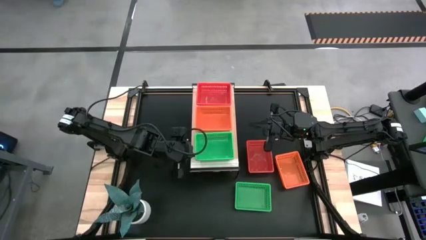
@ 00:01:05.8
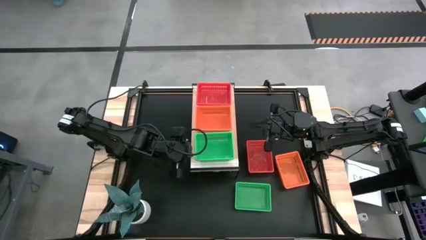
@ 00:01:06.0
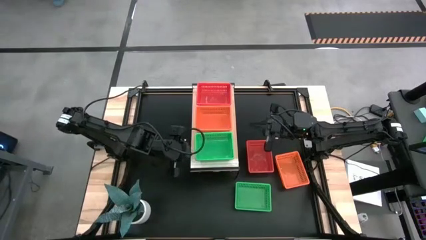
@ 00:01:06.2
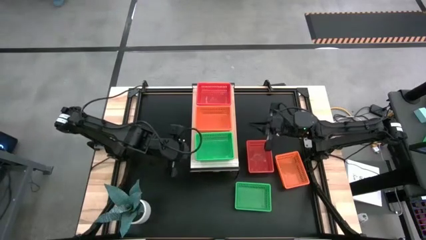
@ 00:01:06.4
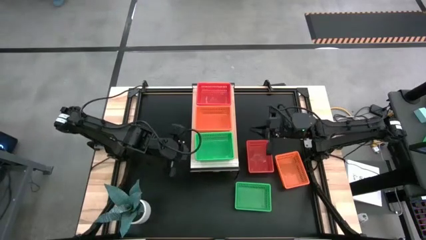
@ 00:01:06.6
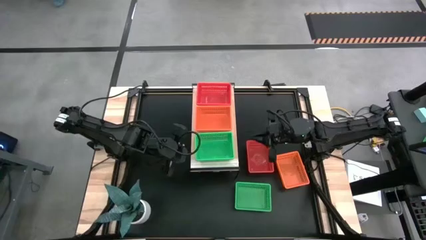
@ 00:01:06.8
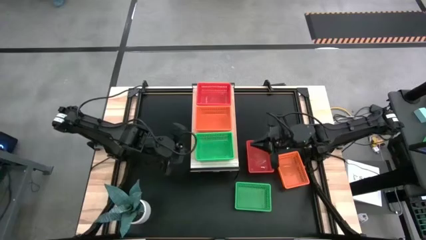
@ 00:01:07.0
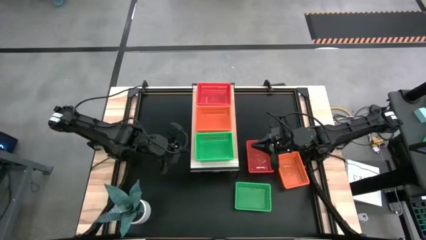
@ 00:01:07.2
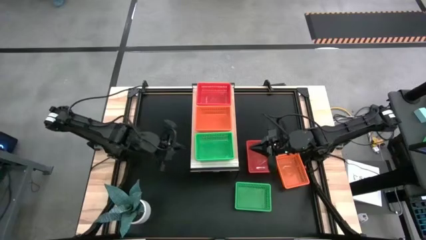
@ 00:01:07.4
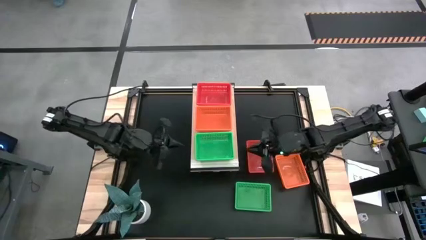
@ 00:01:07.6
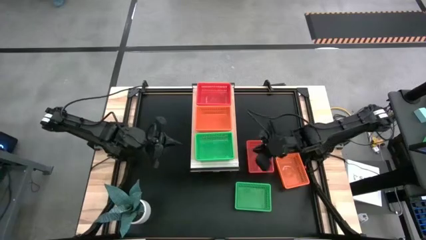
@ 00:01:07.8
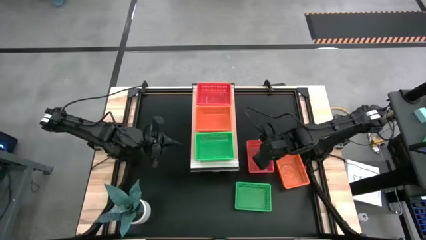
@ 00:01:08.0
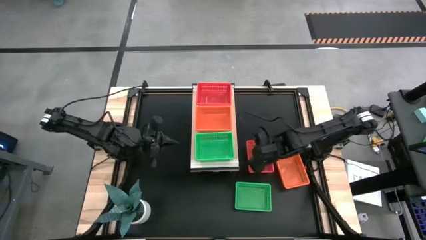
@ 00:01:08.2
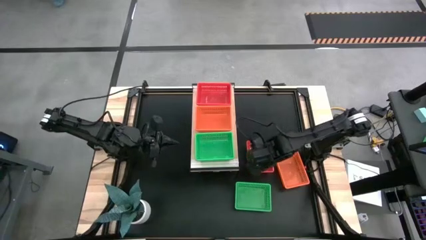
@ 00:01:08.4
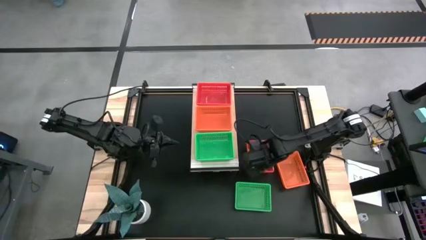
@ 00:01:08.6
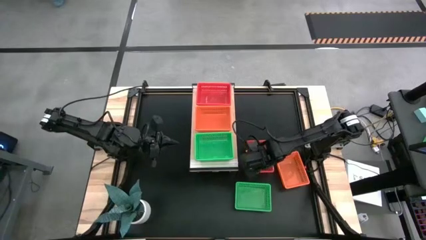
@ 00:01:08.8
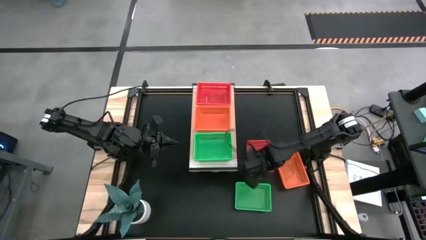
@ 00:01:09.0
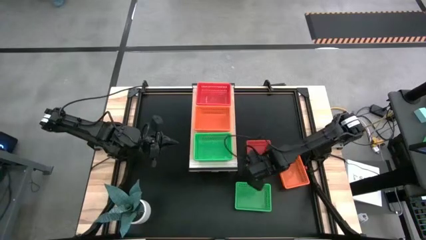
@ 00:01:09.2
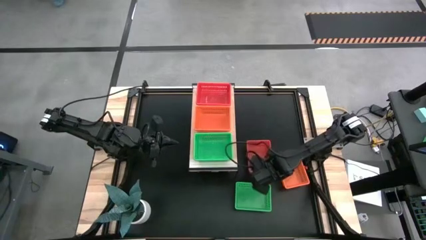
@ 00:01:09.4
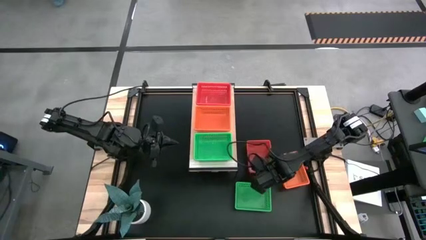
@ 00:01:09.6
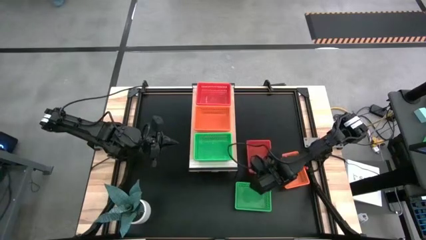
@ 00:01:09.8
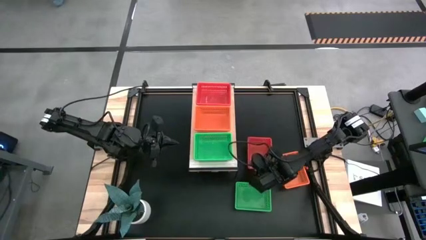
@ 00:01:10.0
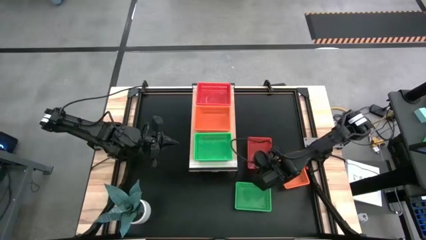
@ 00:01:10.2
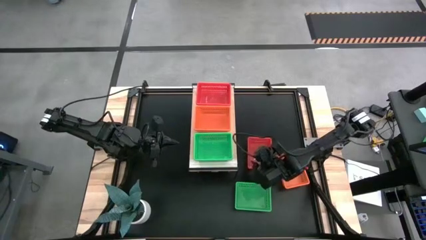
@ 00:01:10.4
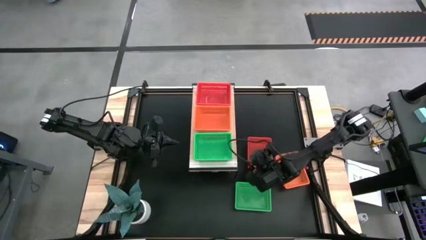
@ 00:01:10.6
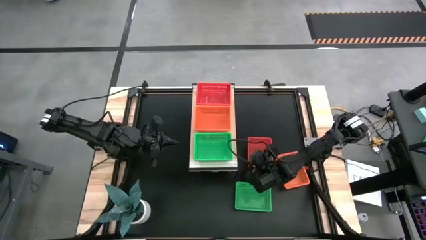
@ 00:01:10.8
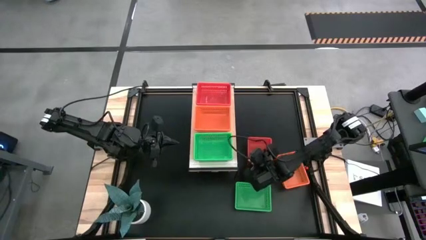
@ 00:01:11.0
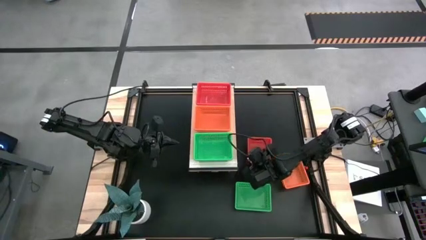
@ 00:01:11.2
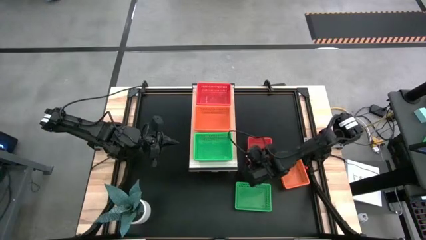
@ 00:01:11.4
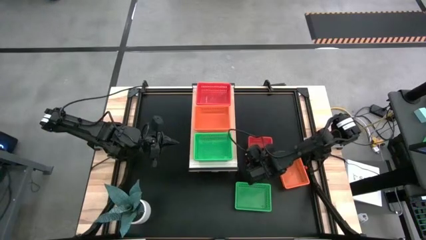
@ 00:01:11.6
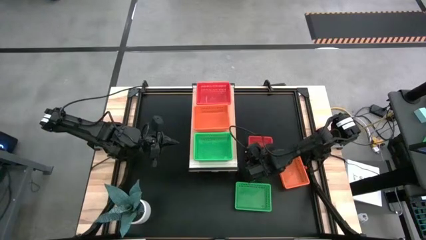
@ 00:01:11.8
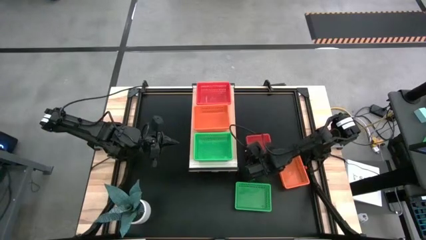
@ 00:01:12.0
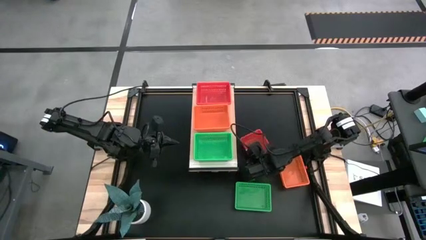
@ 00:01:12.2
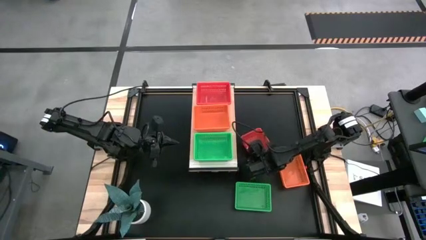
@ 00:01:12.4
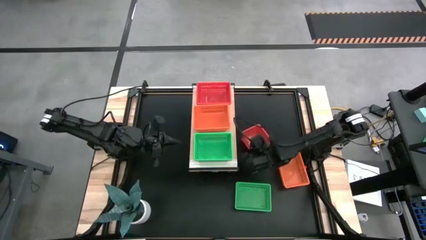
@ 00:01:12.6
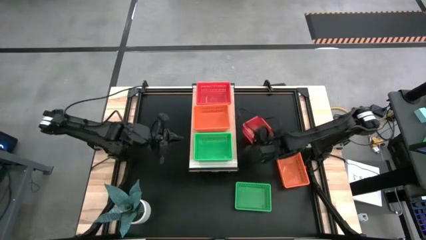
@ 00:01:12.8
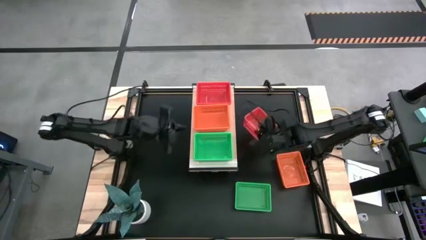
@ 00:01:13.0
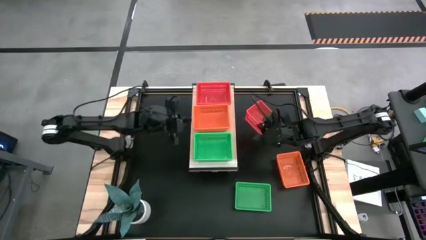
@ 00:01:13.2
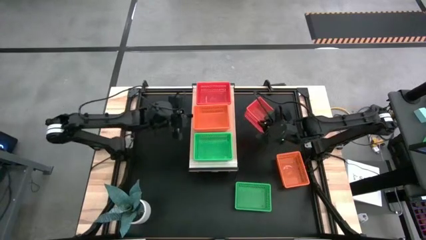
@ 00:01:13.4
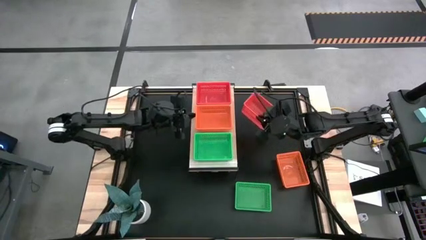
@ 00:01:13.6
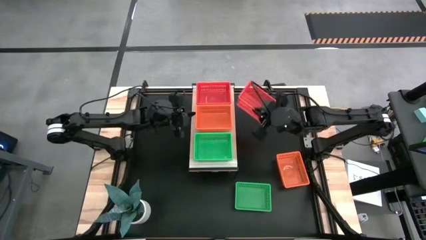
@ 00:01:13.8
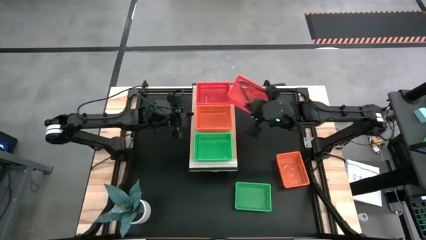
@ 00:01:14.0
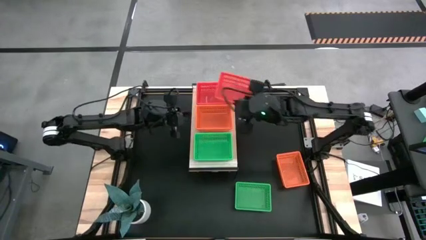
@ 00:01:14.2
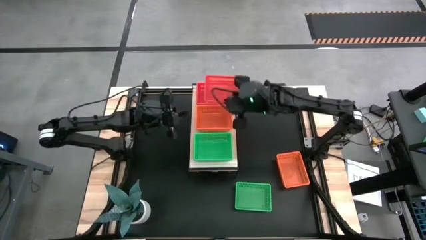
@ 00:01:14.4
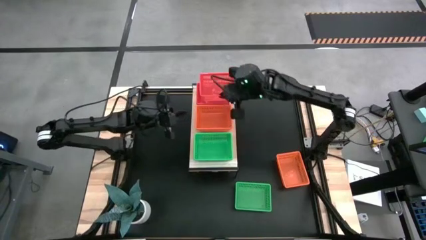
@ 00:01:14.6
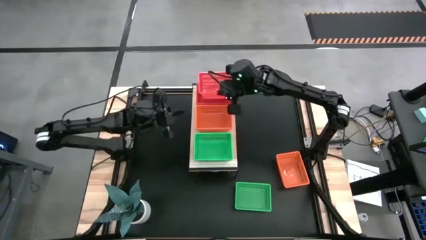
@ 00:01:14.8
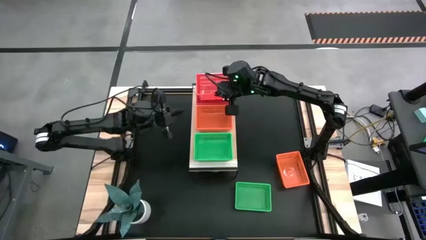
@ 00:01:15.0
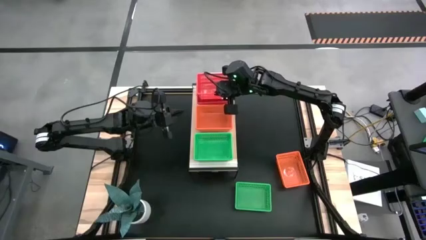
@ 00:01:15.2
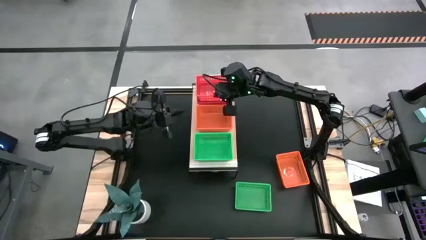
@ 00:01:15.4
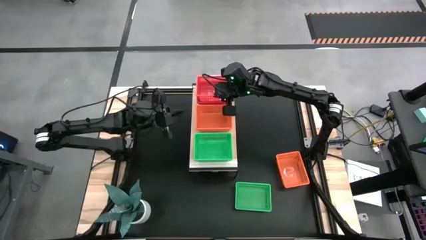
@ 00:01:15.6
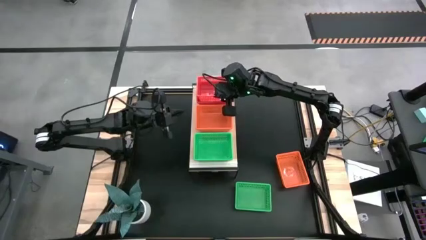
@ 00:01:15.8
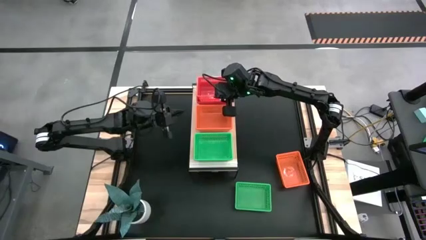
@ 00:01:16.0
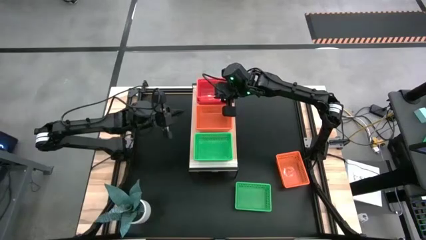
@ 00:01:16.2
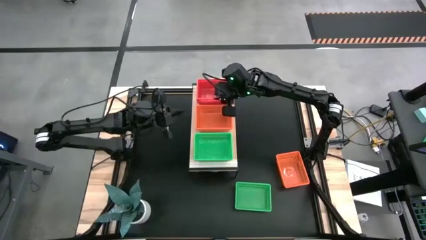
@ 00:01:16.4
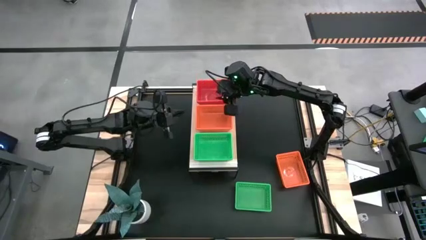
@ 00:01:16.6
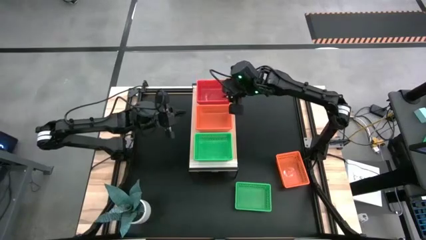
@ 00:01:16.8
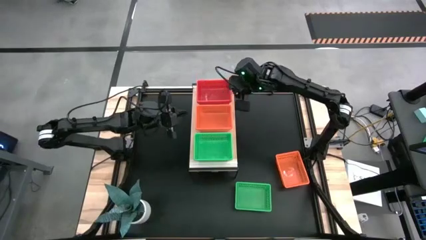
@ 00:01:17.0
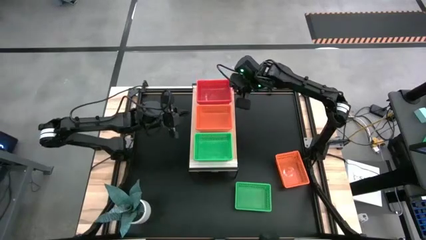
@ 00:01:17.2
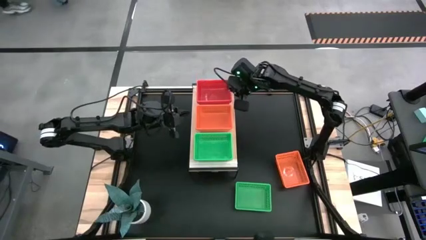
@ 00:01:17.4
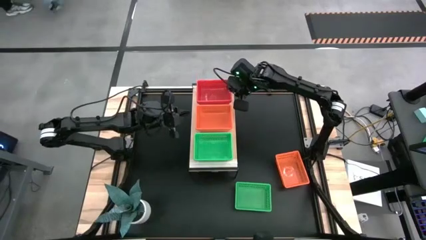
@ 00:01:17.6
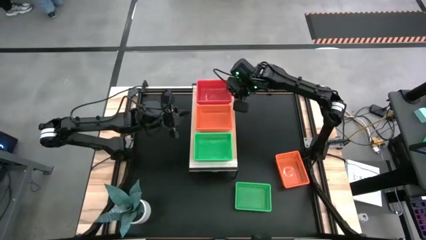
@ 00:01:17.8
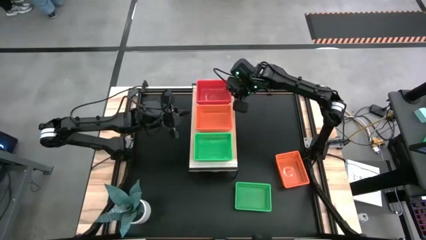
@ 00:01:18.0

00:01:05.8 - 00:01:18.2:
Task: Stack baskets on shelf by color
Stack the red bin on the red bins on the shelf
